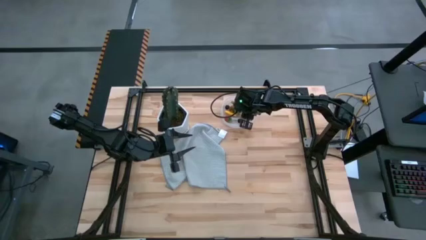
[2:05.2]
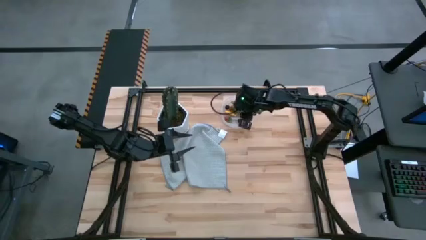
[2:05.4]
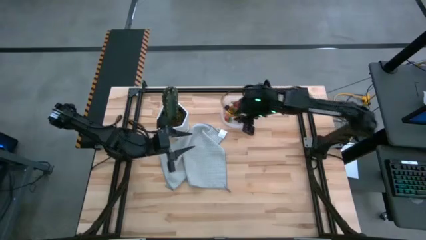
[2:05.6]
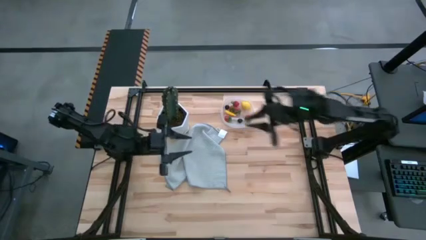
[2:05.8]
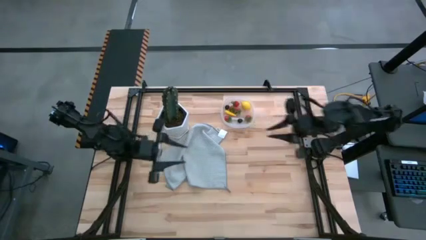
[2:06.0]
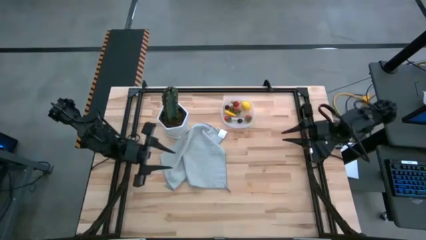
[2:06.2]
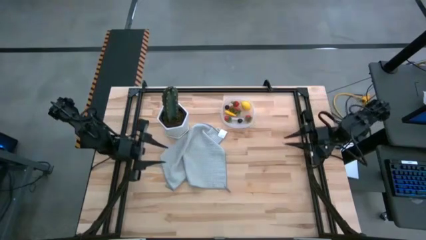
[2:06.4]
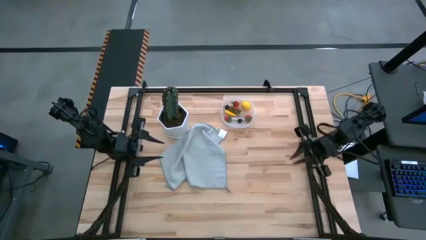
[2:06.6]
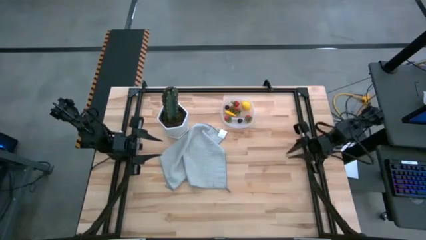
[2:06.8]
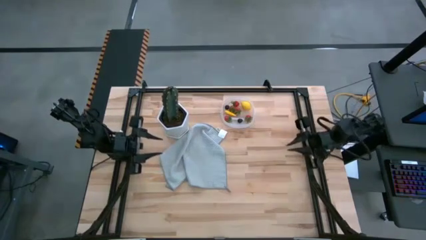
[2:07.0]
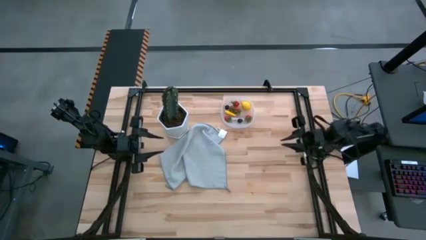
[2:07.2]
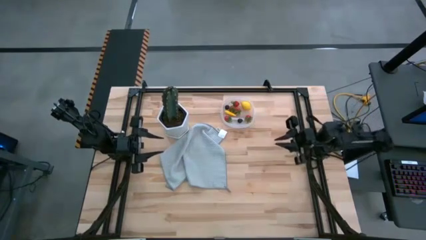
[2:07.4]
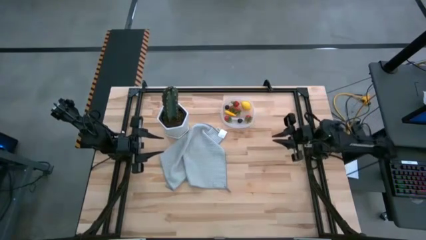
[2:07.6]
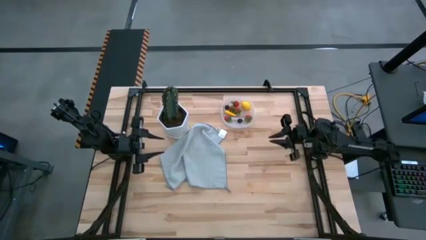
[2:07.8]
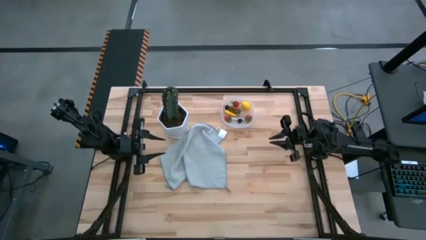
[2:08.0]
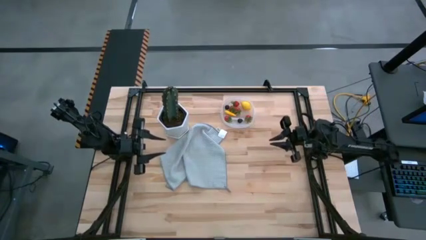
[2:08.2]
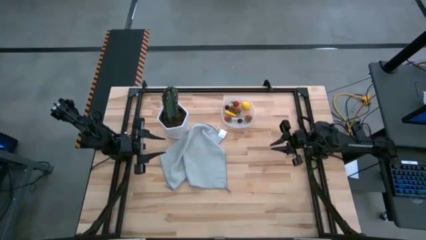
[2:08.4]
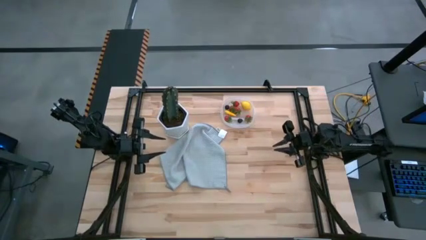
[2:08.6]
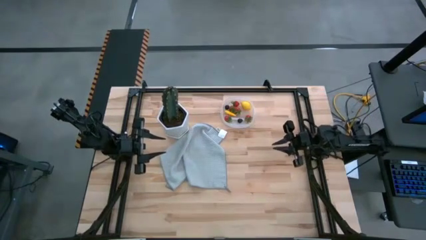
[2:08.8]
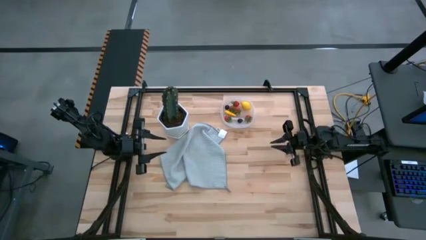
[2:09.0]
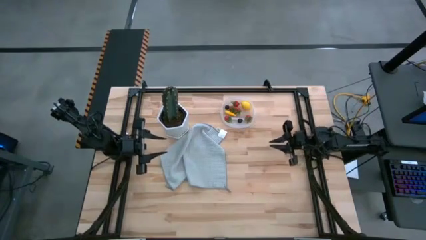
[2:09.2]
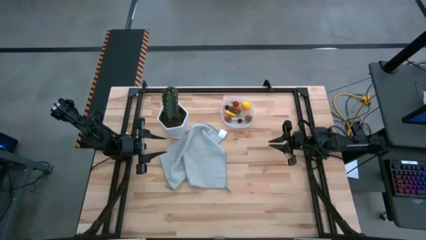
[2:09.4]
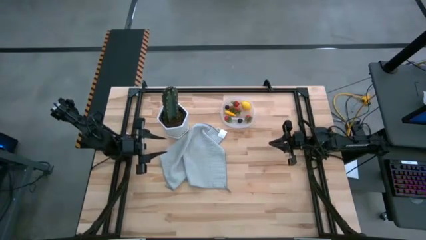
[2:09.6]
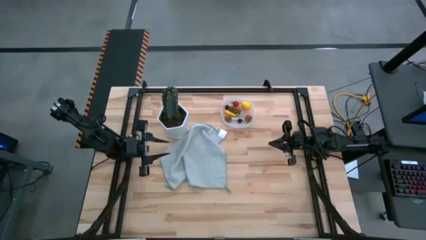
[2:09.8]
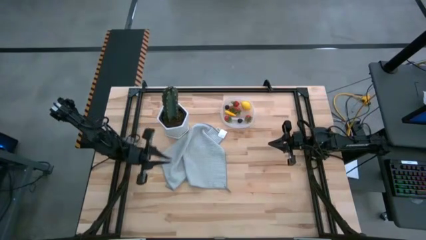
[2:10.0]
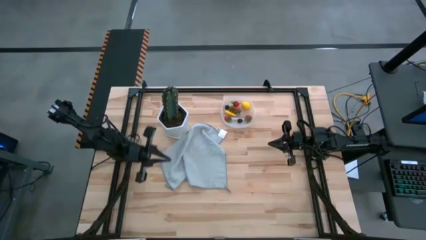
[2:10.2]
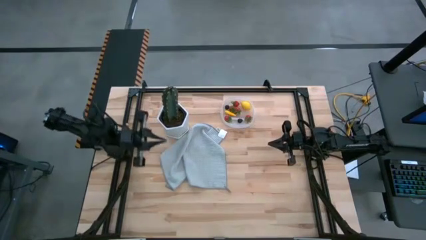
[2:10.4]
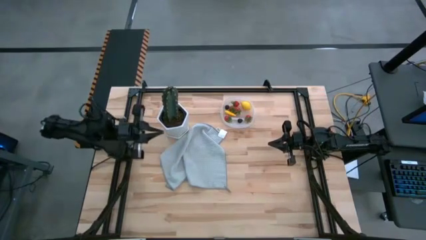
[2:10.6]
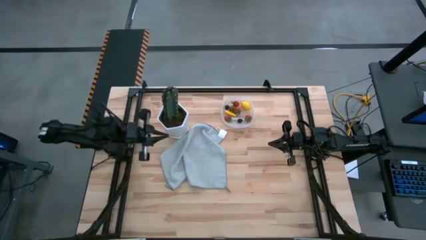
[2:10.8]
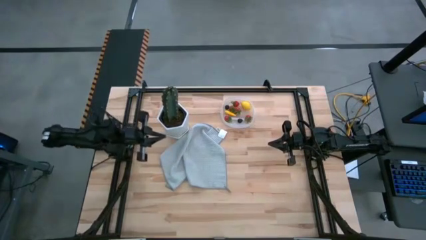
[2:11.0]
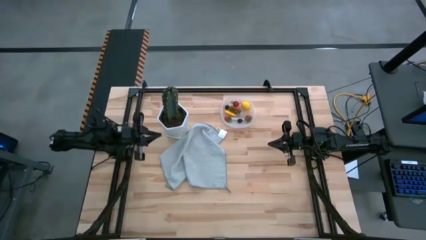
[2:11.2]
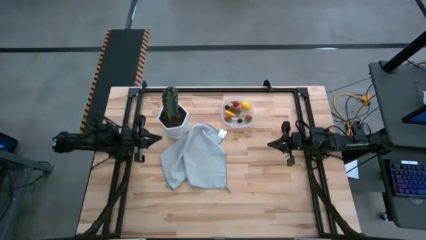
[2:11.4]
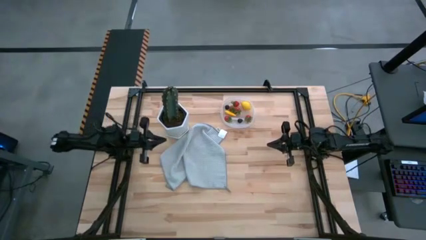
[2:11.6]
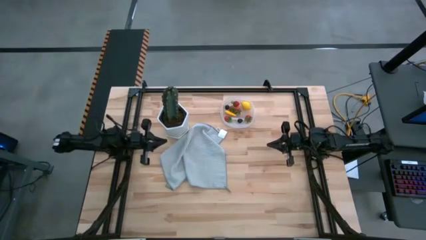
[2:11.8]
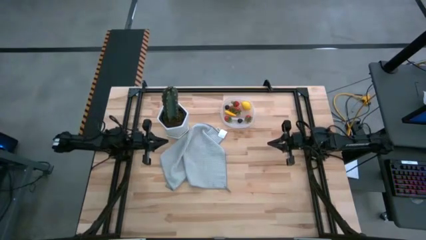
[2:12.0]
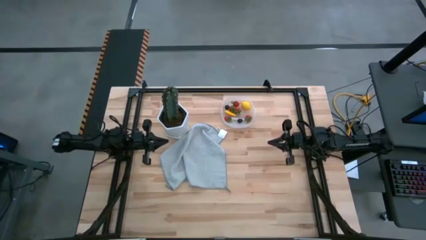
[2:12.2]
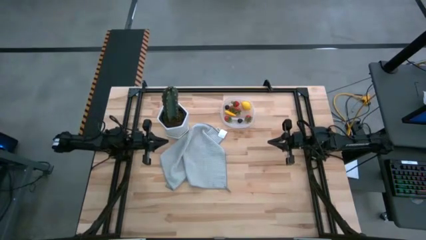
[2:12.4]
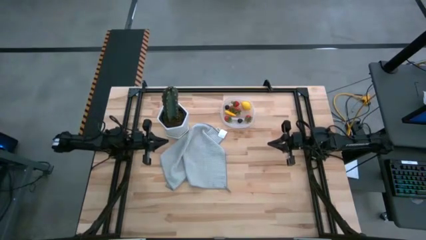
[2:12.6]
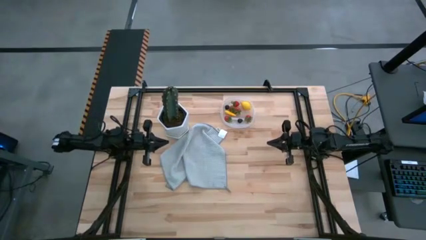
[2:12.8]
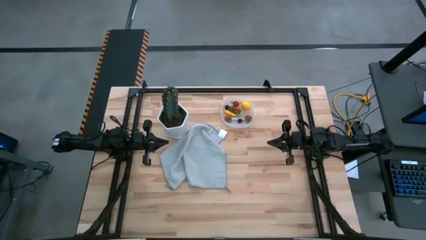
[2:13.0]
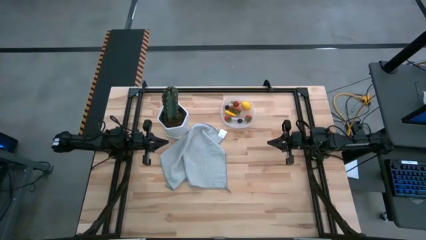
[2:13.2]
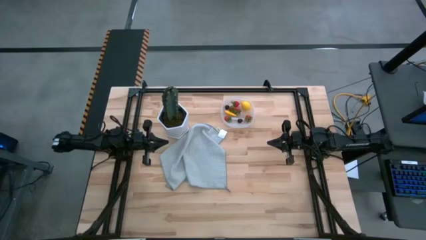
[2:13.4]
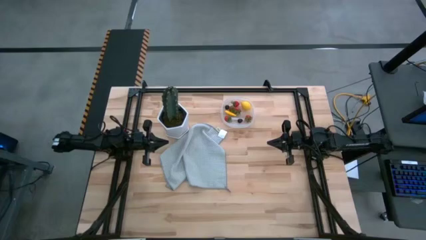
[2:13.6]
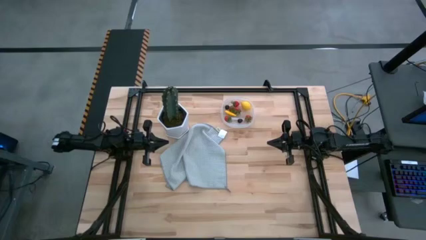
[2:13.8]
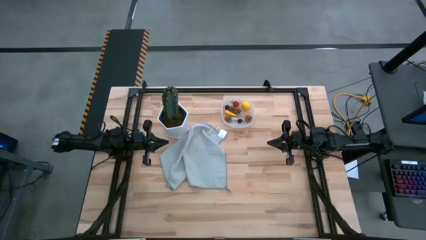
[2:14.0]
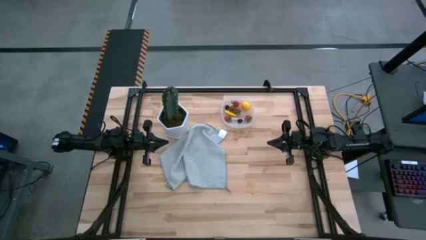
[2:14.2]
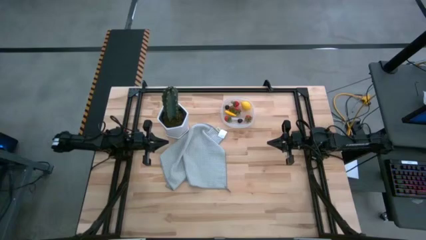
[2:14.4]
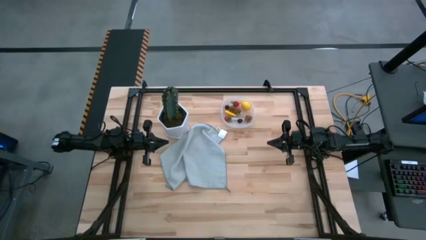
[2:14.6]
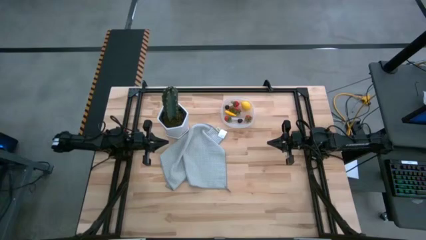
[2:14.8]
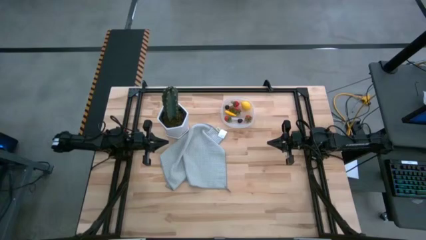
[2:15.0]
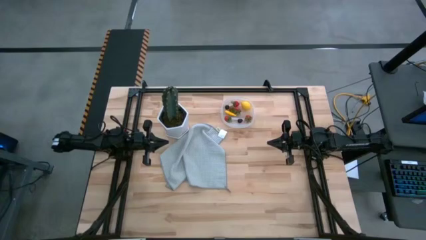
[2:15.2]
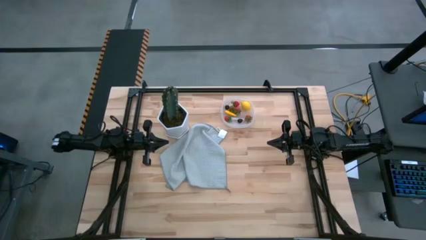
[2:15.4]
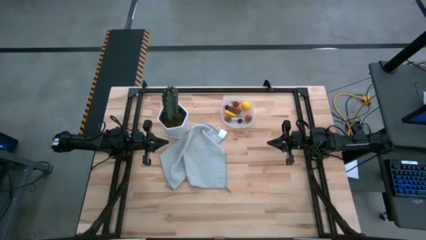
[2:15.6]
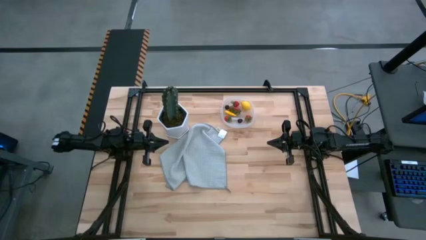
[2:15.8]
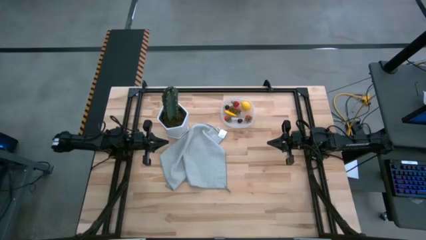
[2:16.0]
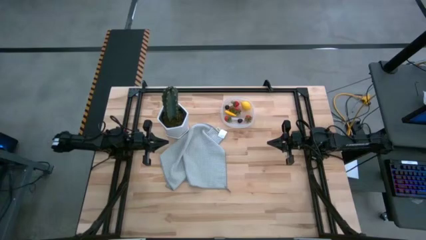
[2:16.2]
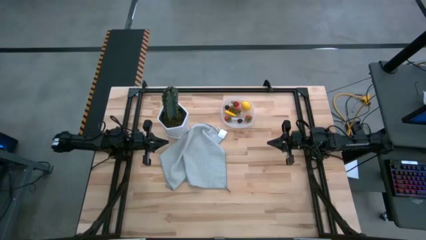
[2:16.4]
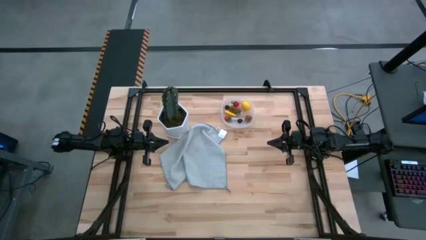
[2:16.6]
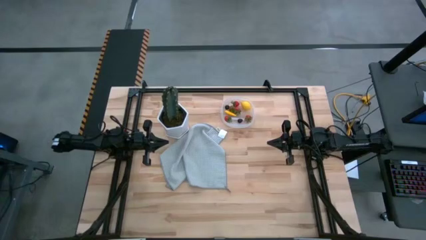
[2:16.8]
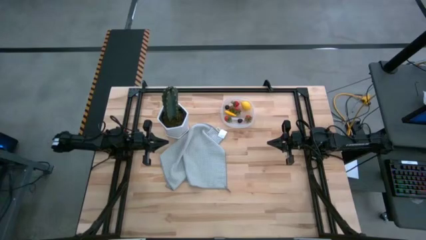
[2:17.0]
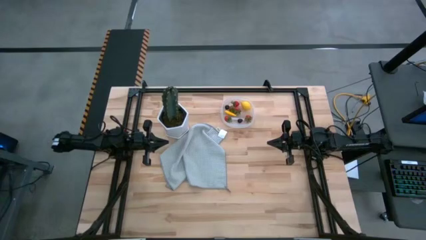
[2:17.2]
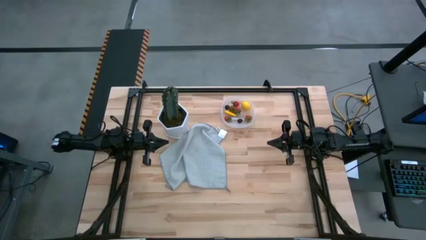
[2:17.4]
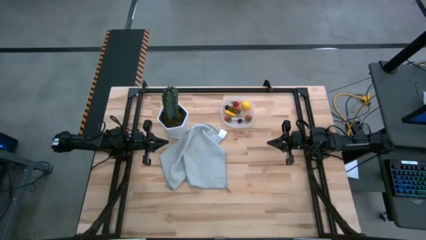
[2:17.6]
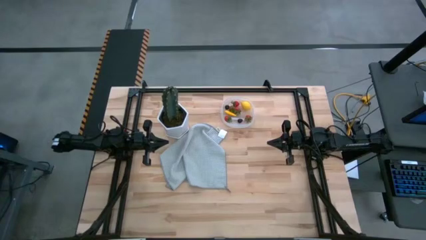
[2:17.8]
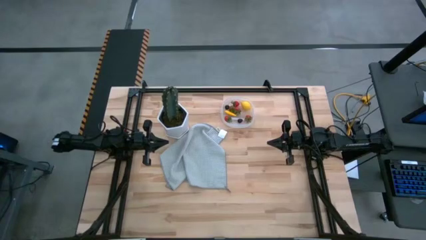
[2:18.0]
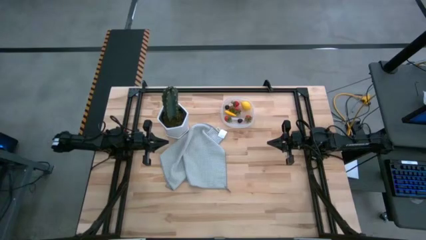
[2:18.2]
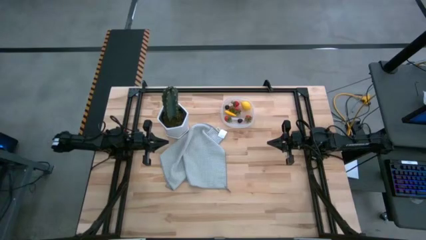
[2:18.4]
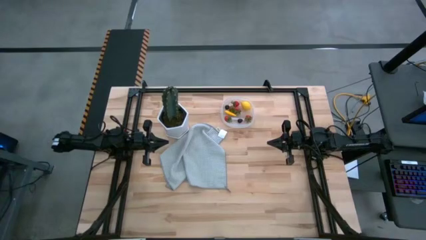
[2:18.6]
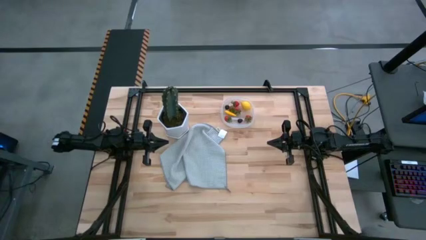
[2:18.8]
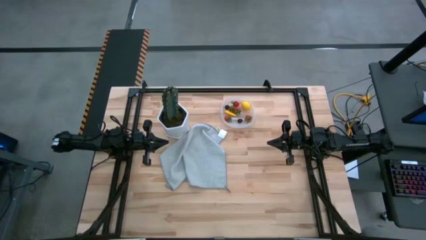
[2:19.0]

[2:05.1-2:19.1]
Task: Pick and placing Produce into tupperware
Return to Home Position

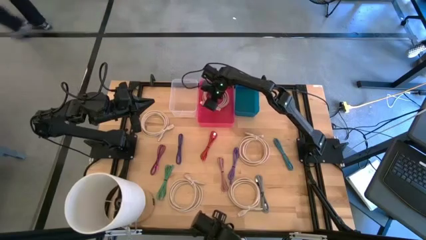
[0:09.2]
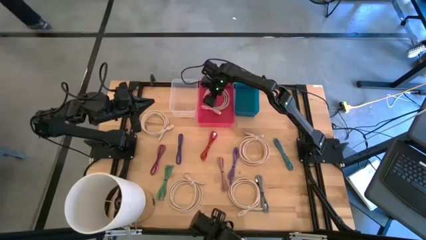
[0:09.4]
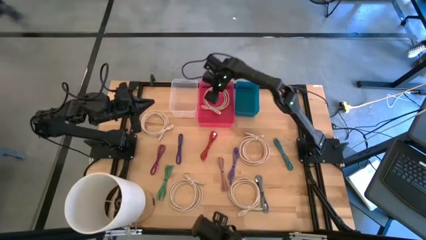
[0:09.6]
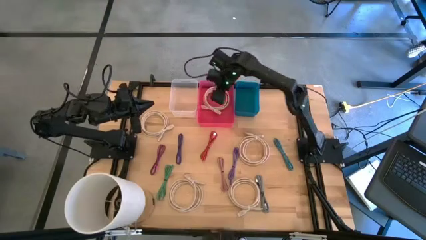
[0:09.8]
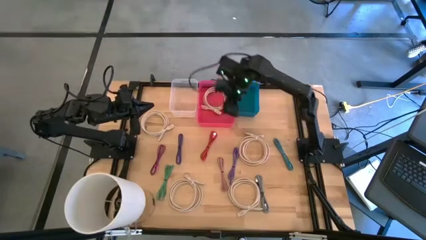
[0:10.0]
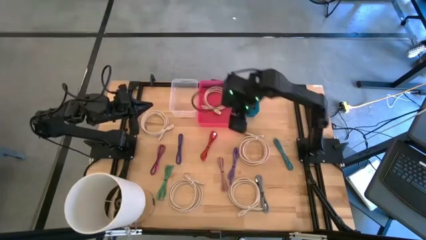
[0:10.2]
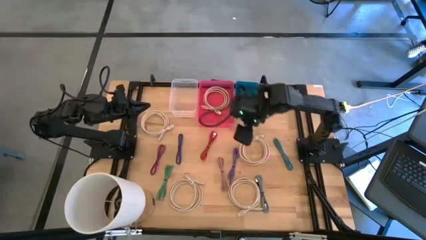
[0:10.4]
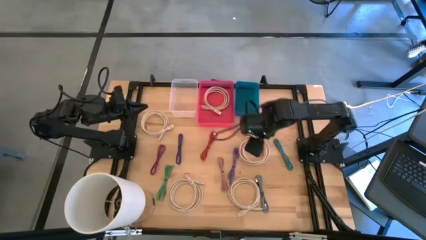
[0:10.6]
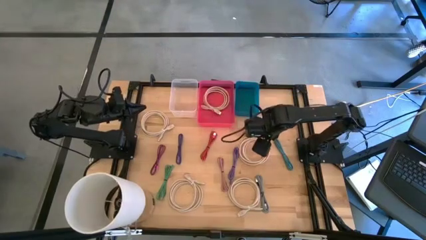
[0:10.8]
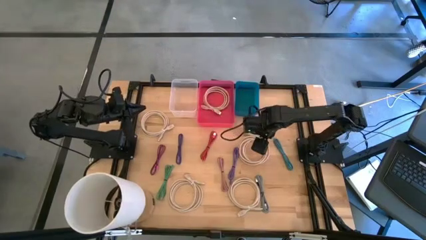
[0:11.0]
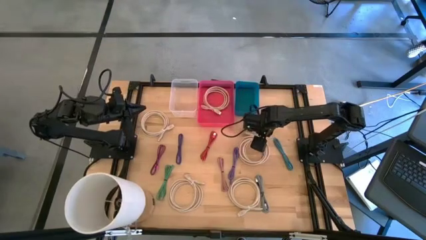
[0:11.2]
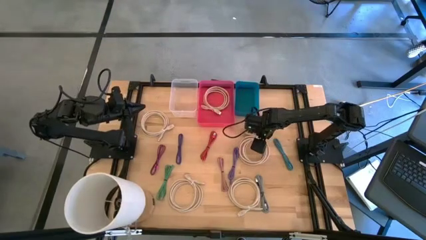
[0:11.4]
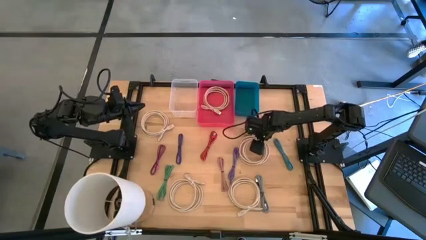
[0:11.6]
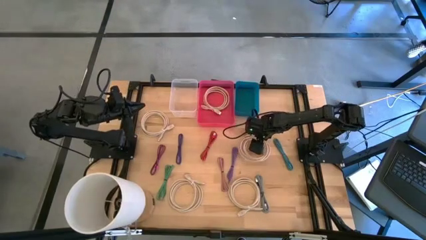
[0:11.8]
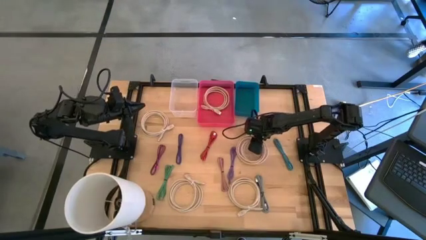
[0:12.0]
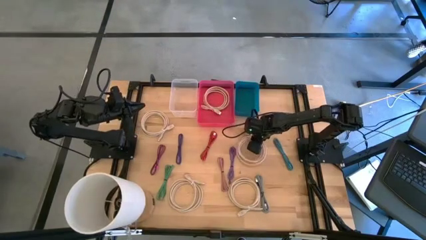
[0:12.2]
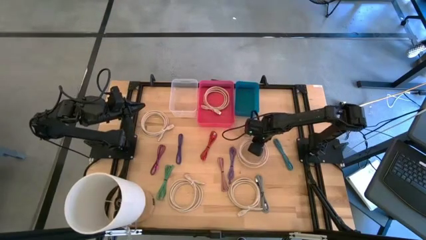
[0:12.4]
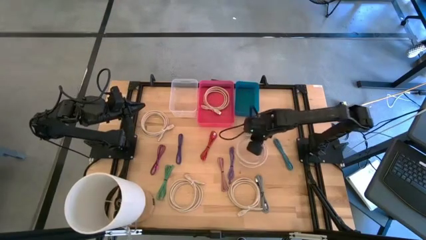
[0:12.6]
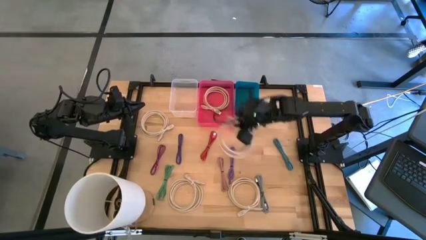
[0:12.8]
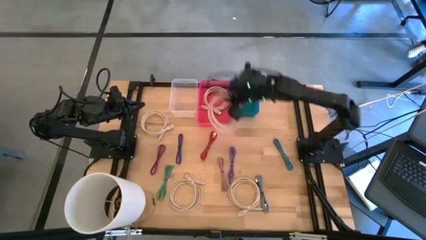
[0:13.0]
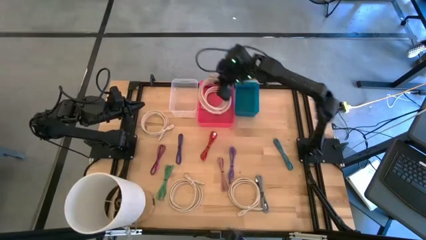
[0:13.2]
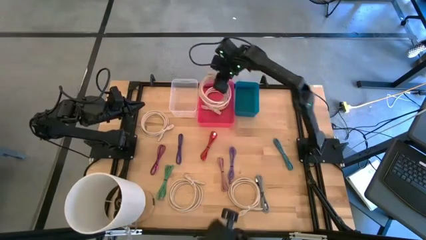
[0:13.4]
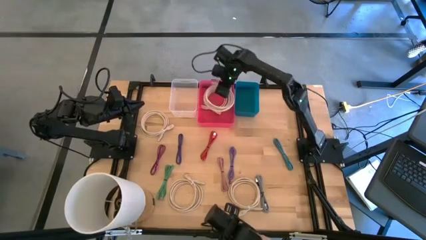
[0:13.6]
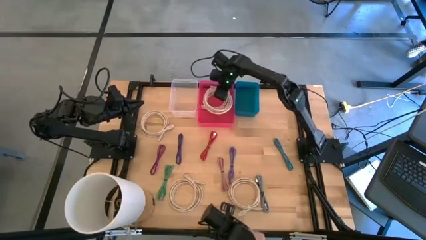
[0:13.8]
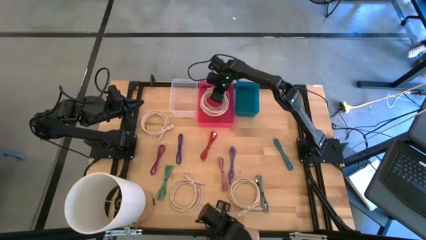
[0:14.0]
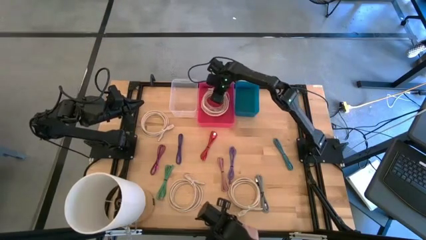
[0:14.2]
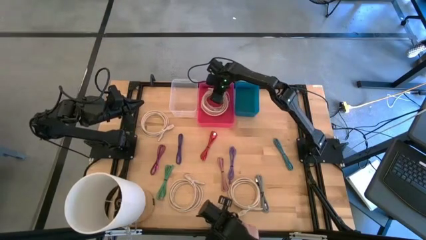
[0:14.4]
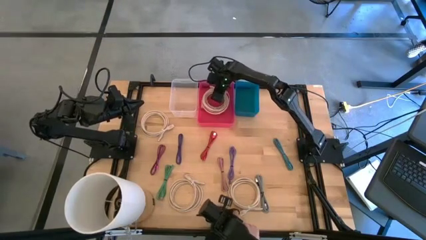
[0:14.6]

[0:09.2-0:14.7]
Task: Pick & Place USB Port
Put the white HDMI cable into the pink bin
